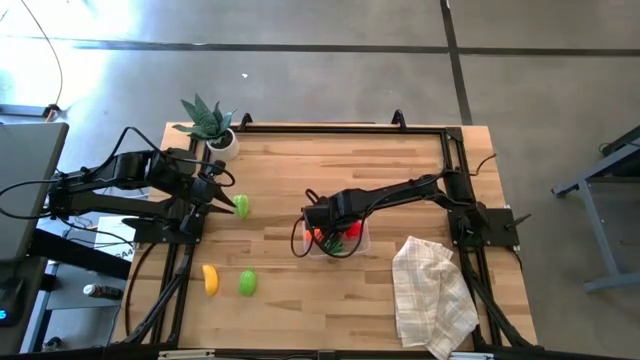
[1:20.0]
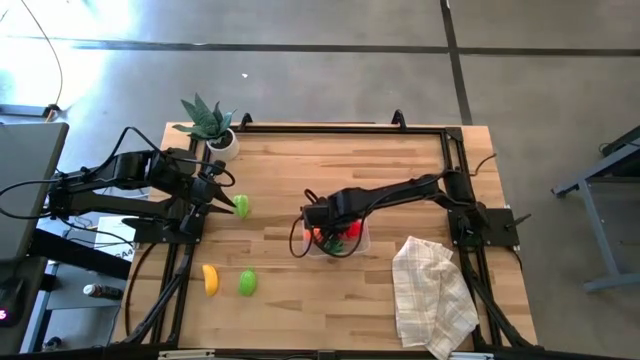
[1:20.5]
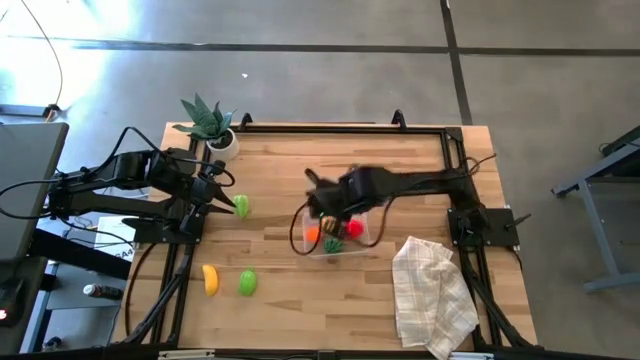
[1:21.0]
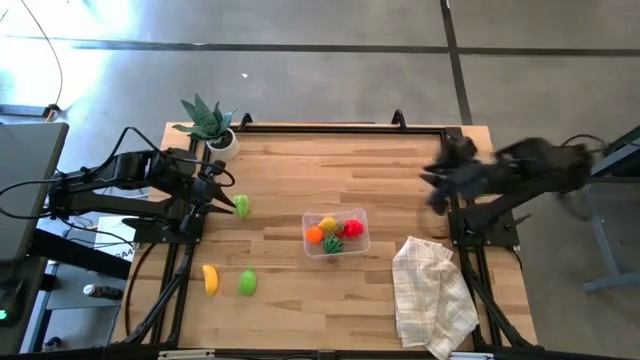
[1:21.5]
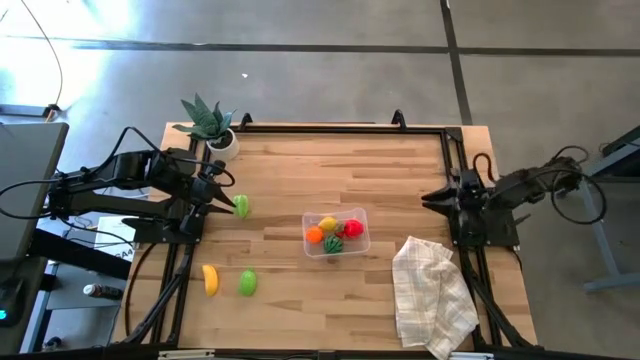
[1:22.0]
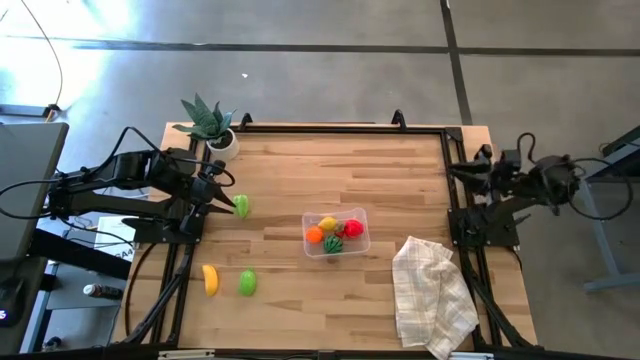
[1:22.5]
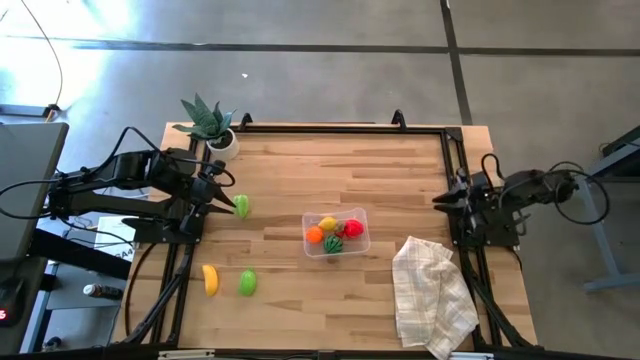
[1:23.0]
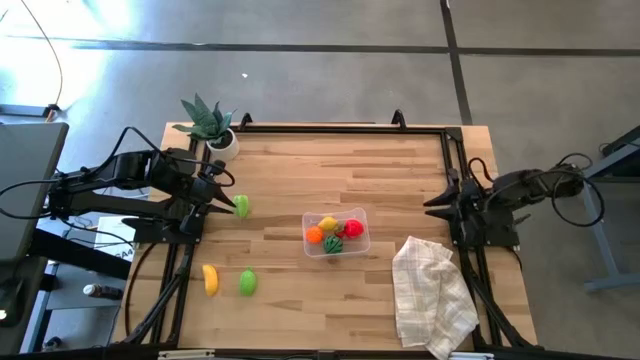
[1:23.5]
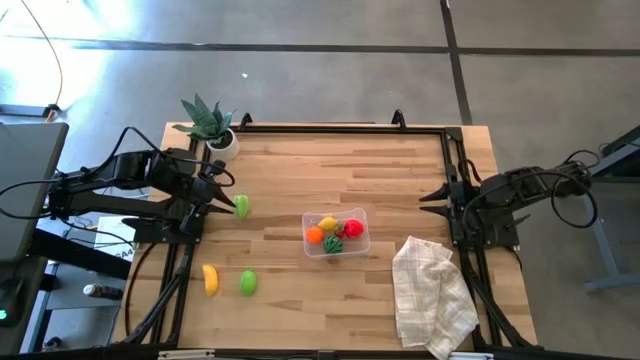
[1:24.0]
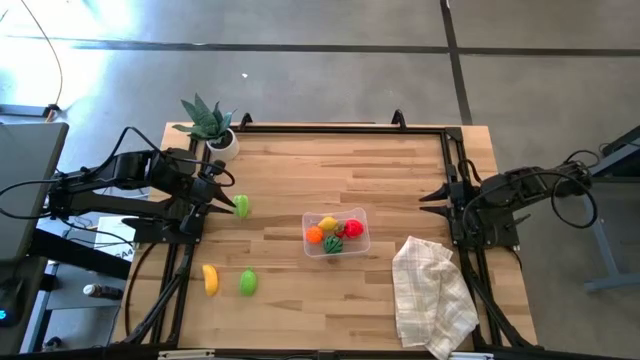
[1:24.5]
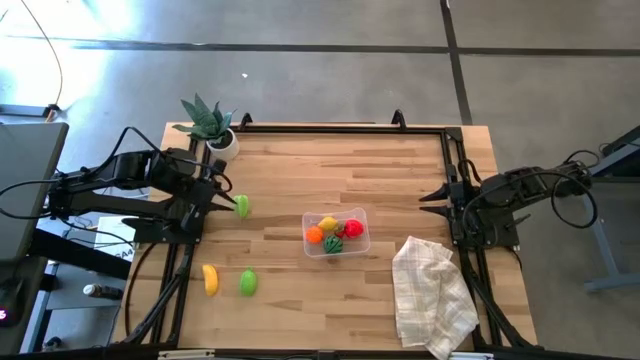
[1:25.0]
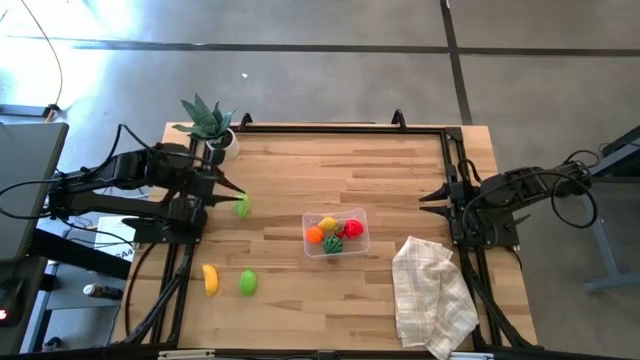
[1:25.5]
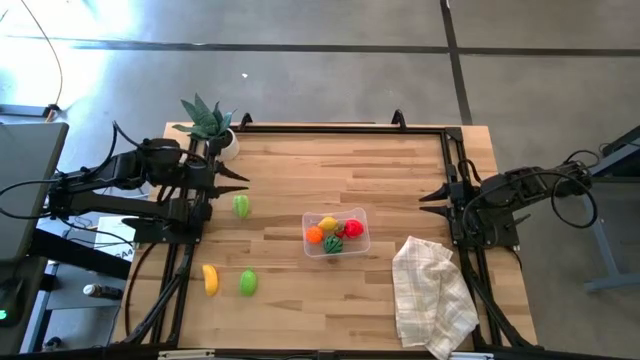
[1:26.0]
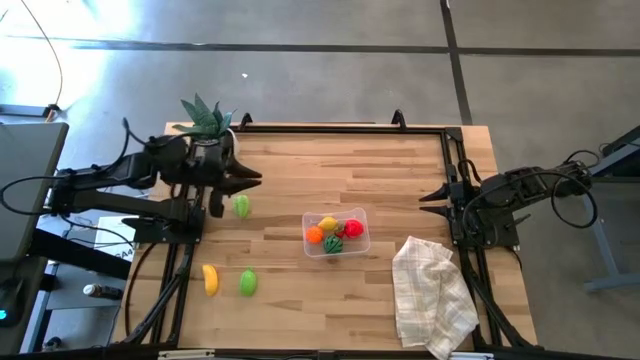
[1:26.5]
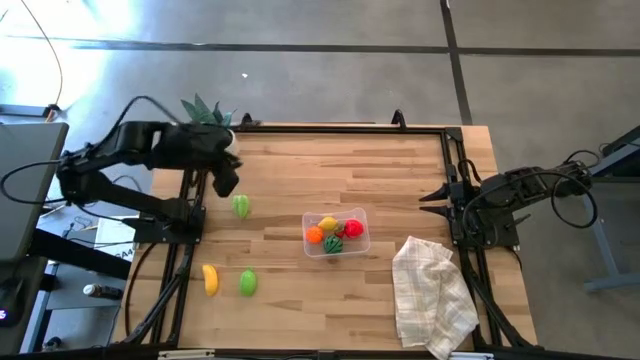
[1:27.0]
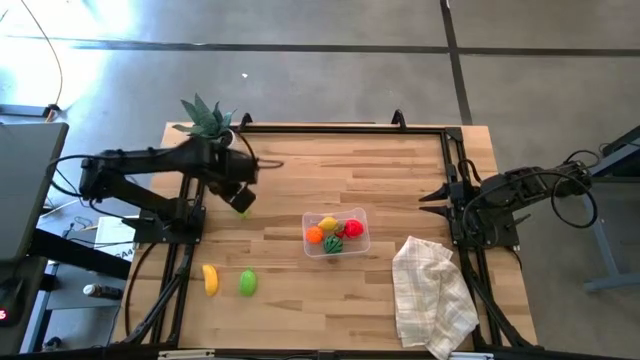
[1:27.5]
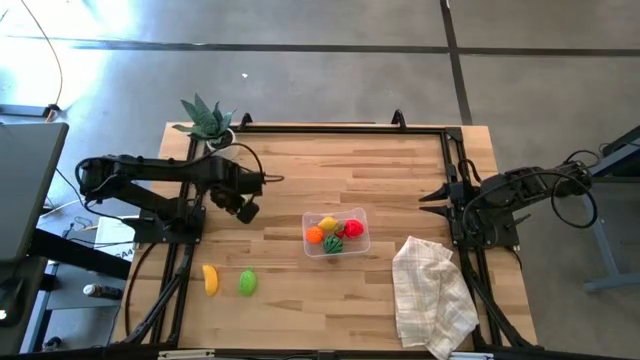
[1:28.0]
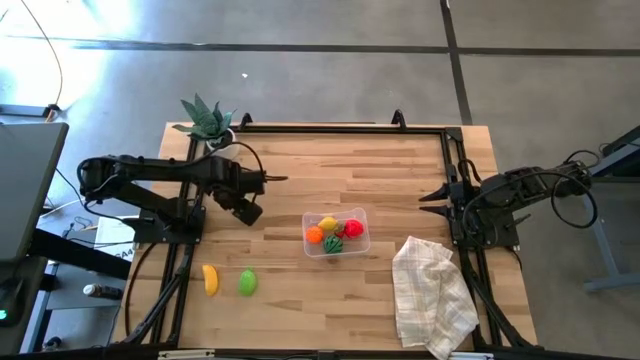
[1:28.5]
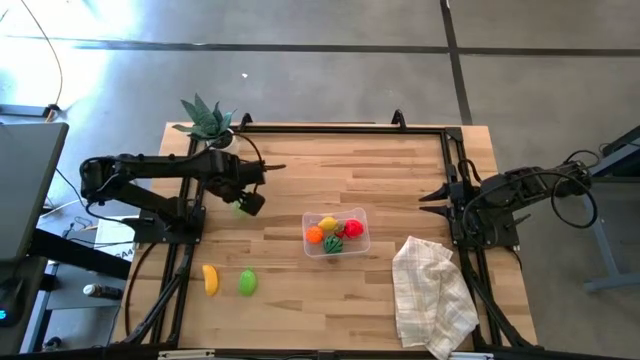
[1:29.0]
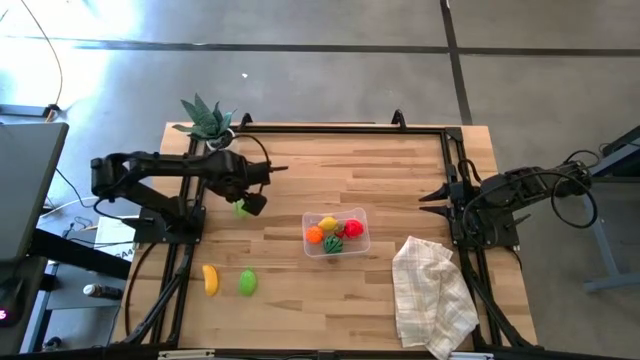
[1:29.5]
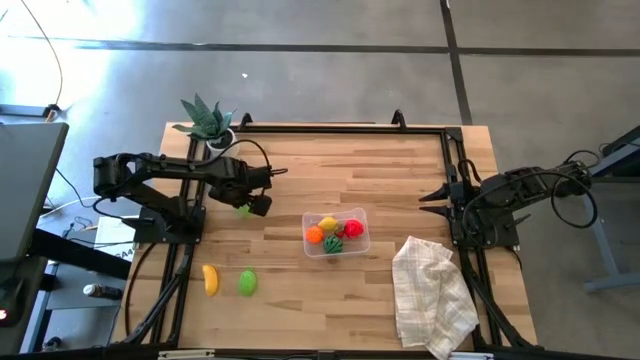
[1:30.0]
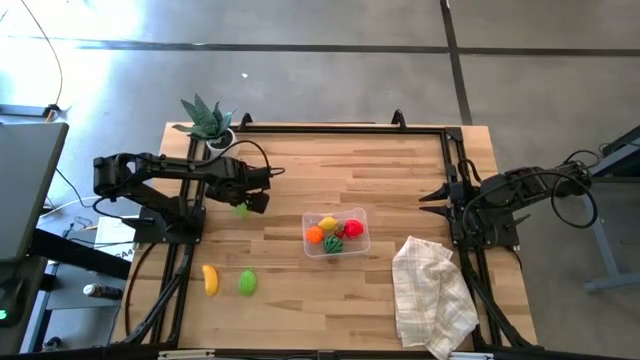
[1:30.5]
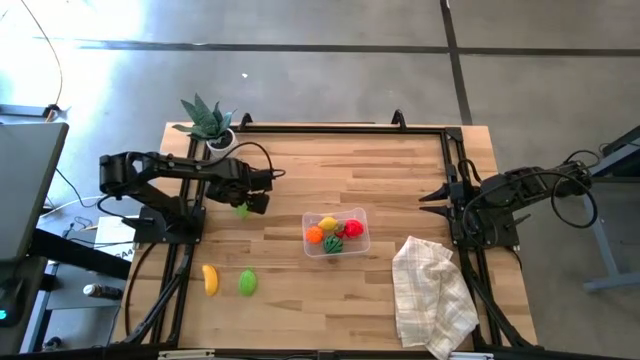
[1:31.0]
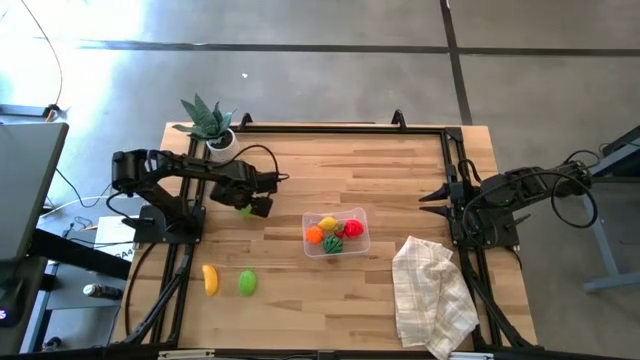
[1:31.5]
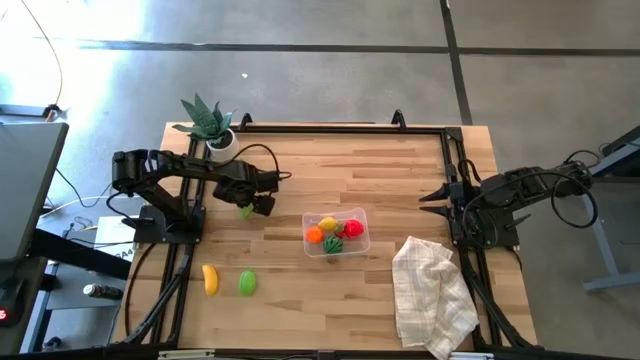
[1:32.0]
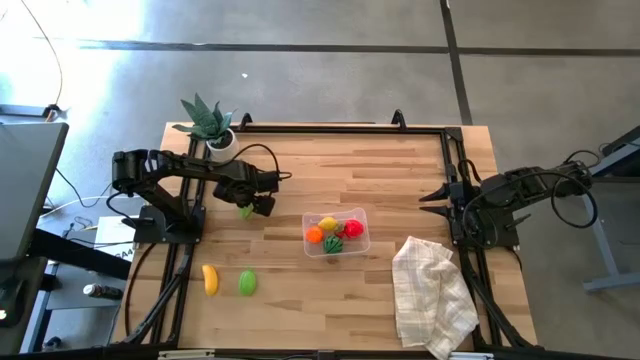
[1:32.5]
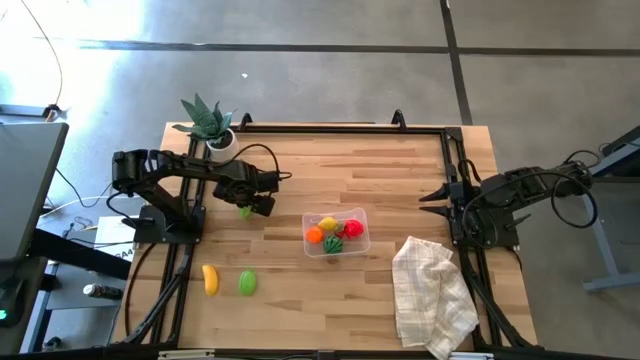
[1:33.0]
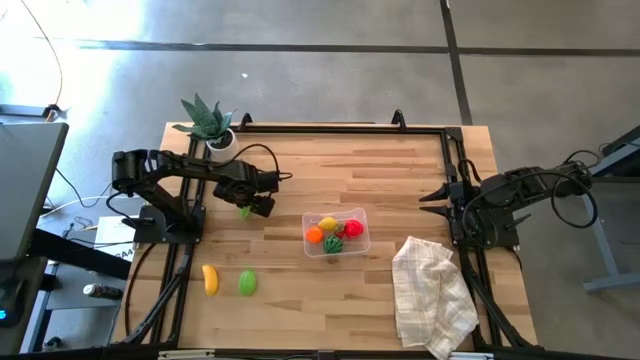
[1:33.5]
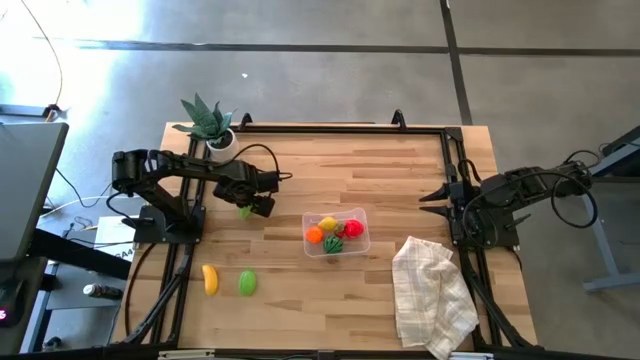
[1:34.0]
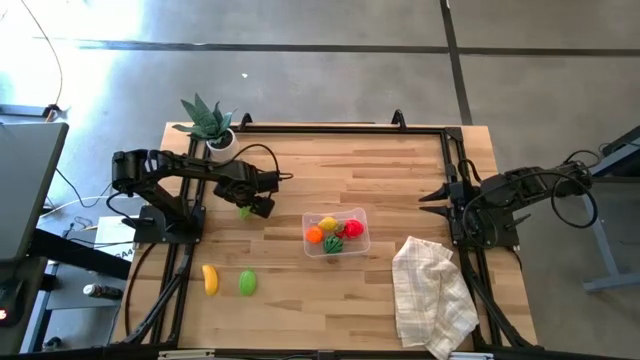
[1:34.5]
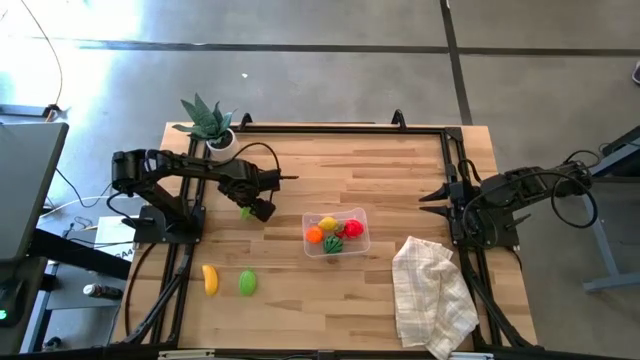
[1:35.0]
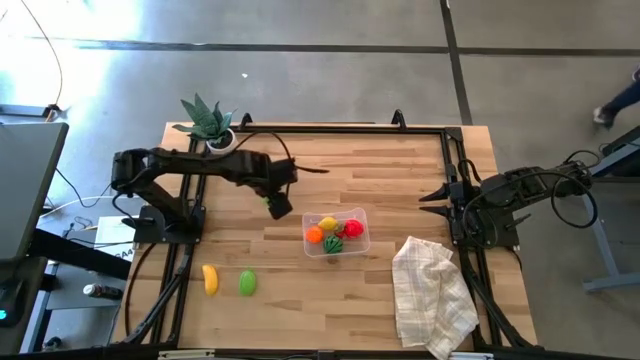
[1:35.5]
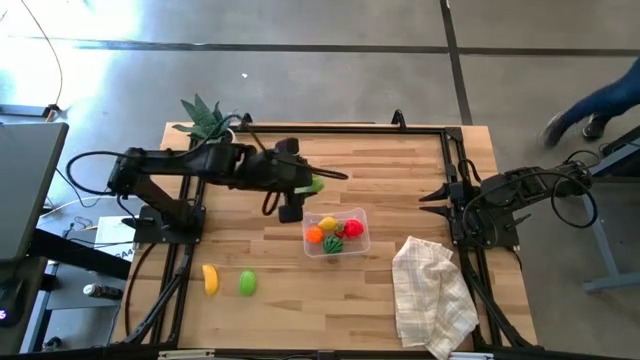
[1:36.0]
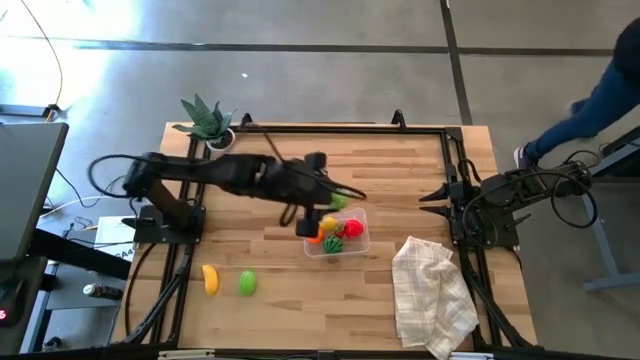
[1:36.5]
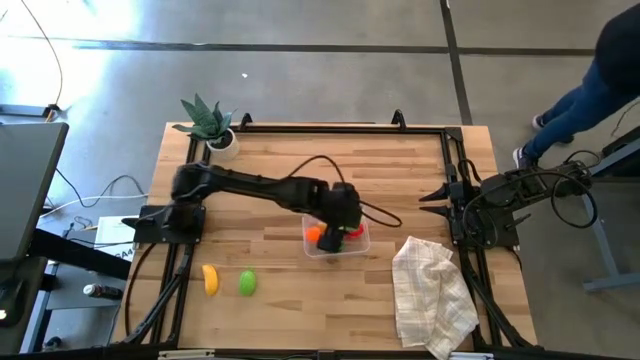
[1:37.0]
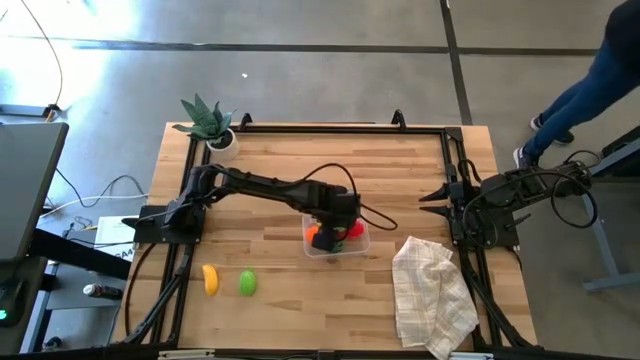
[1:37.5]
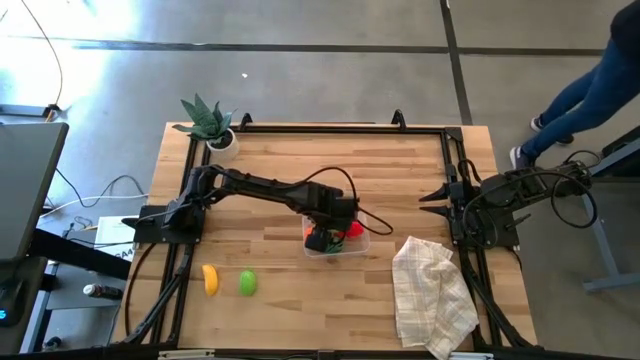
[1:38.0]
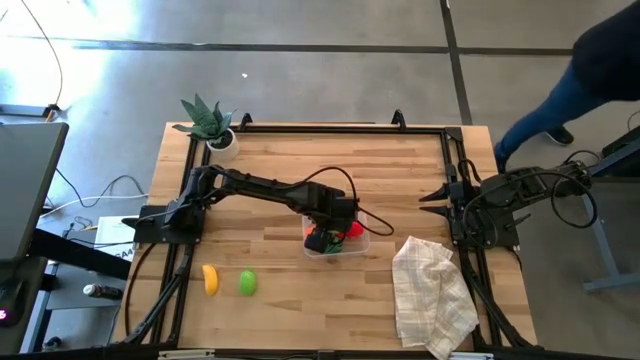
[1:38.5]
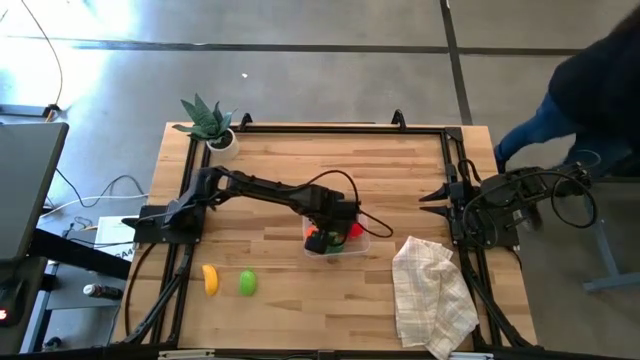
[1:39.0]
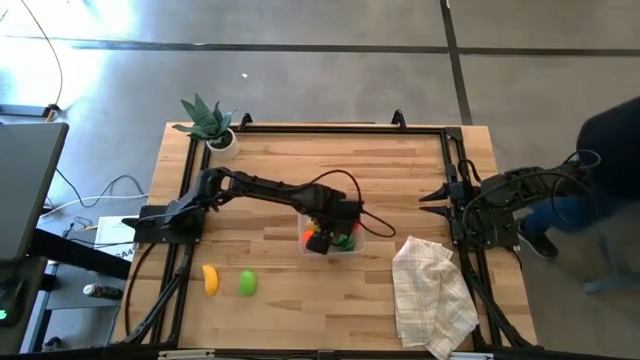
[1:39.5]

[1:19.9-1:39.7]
Task: Pick and placing Produce into tupperware
Put the green starfruit into the transparent bin

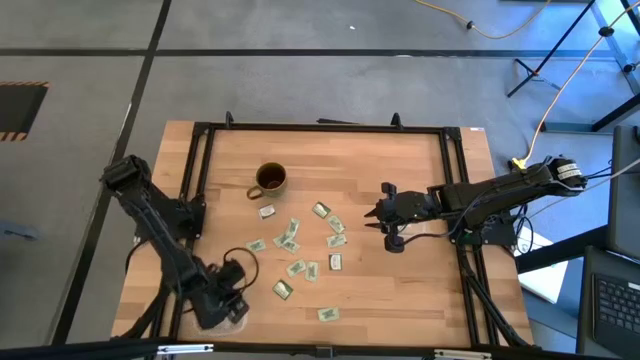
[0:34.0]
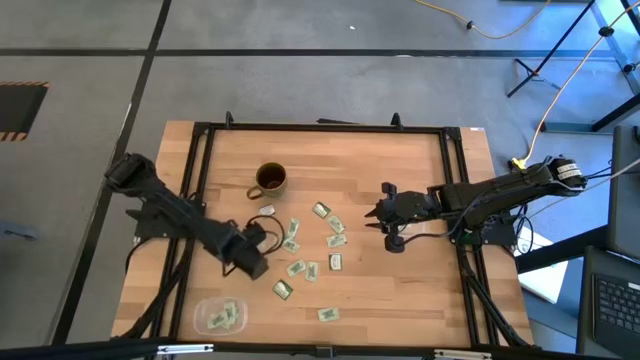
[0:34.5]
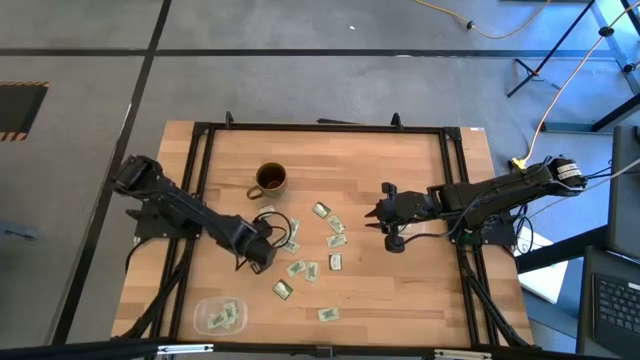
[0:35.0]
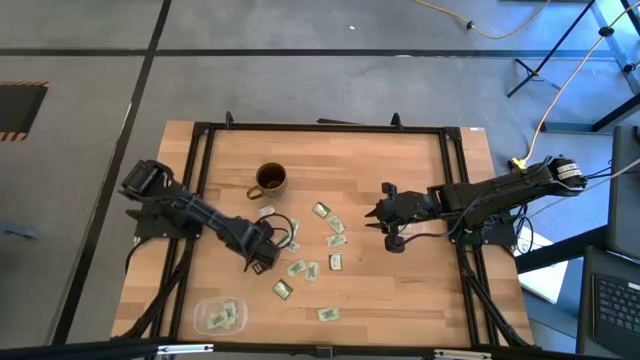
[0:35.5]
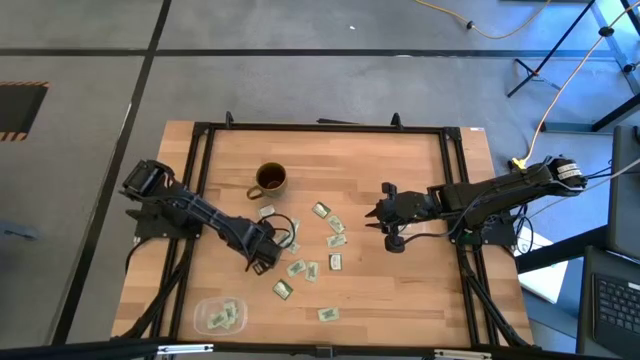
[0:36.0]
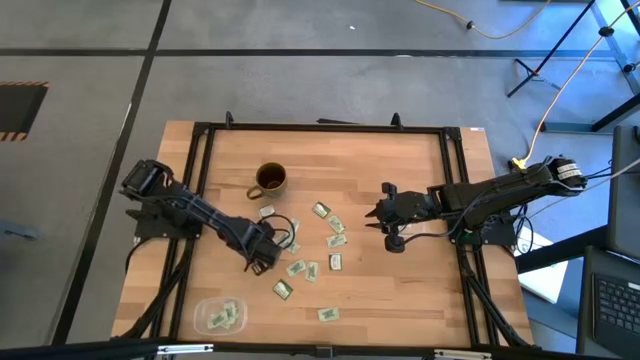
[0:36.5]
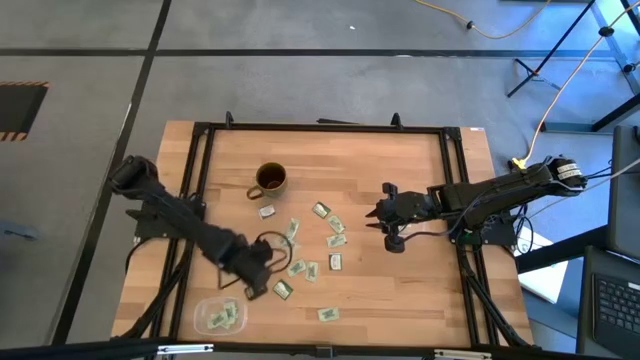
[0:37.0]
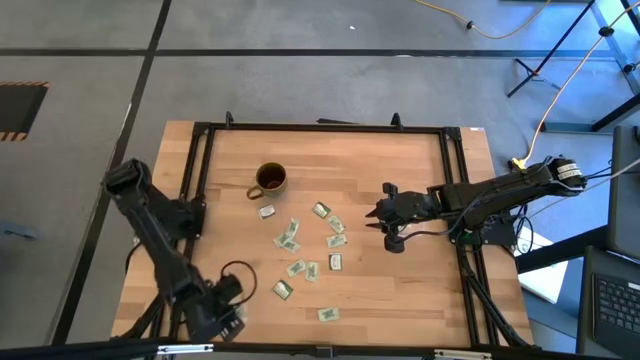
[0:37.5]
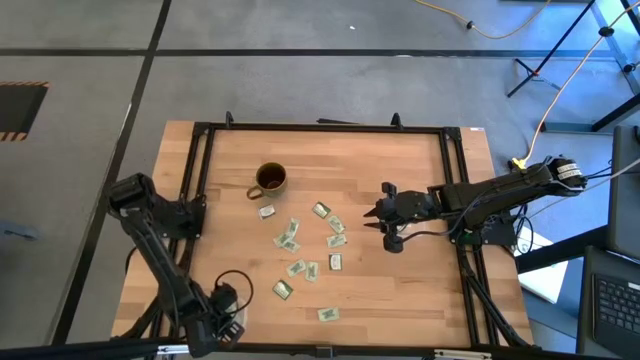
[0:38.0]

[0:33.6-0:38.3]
Task: Pick and place Stevia / Truvia into bins
Put the stevia packet into the bottom transparent container
